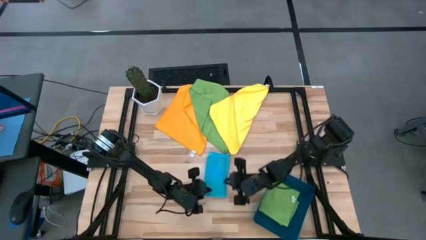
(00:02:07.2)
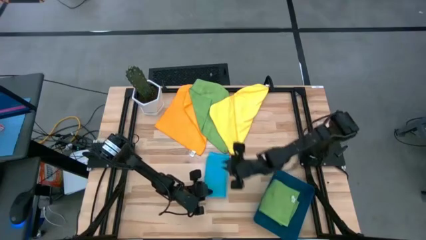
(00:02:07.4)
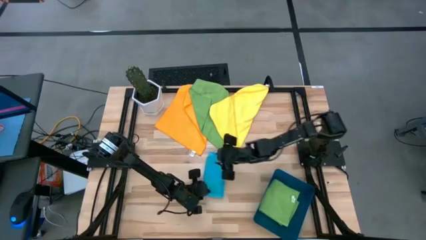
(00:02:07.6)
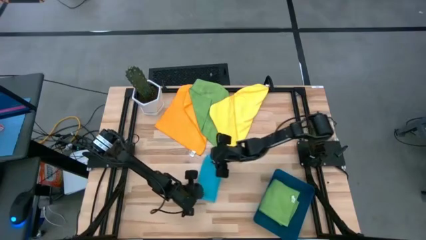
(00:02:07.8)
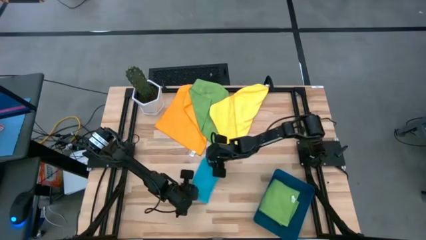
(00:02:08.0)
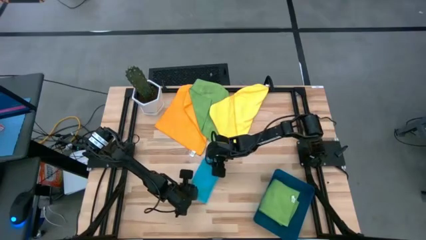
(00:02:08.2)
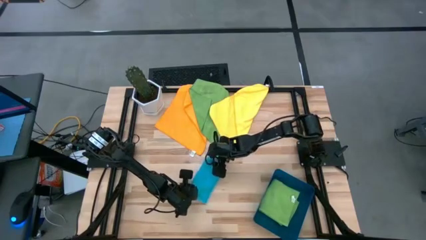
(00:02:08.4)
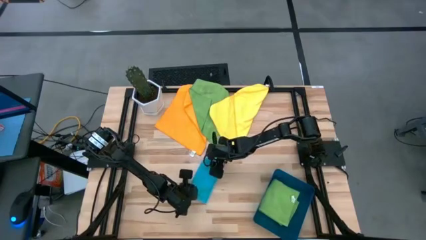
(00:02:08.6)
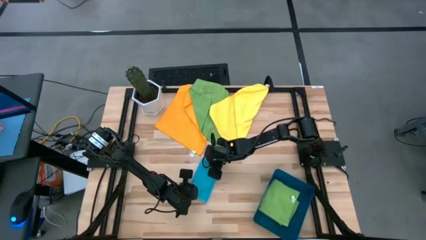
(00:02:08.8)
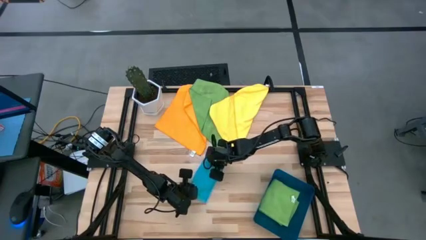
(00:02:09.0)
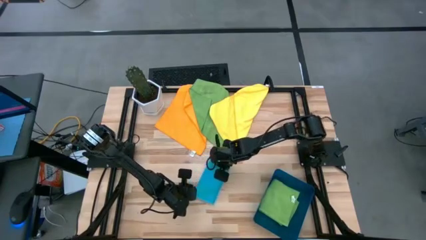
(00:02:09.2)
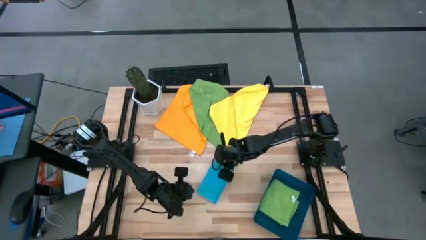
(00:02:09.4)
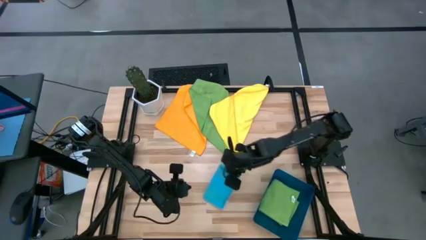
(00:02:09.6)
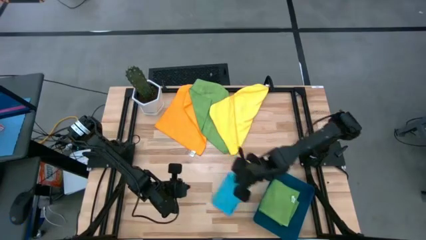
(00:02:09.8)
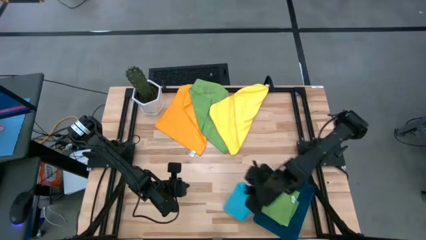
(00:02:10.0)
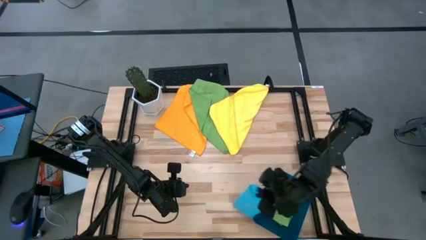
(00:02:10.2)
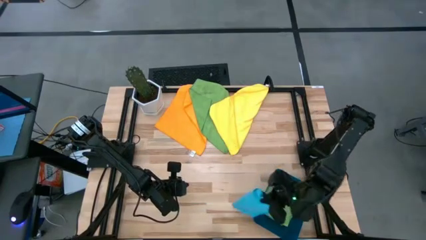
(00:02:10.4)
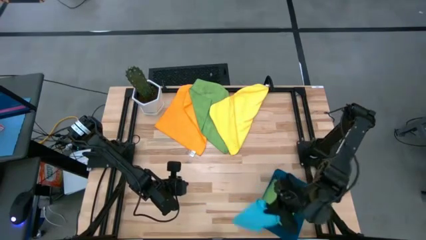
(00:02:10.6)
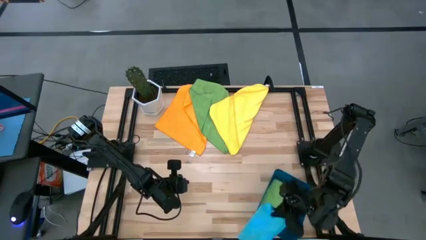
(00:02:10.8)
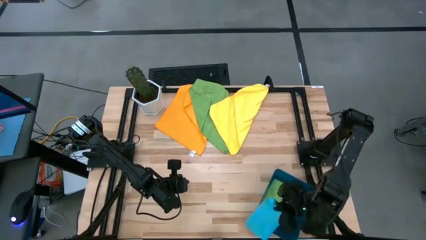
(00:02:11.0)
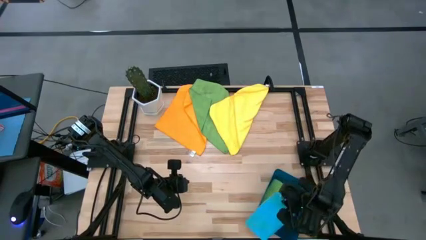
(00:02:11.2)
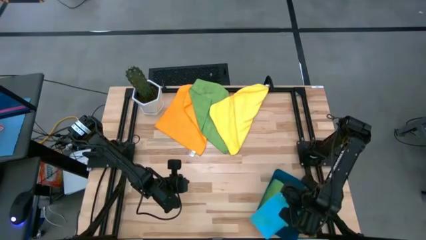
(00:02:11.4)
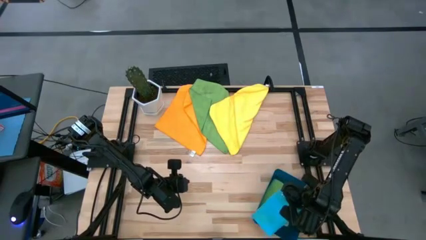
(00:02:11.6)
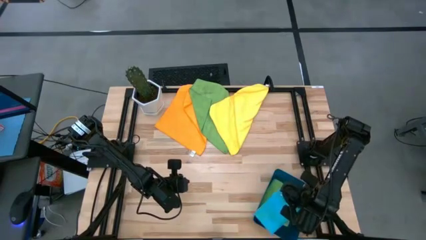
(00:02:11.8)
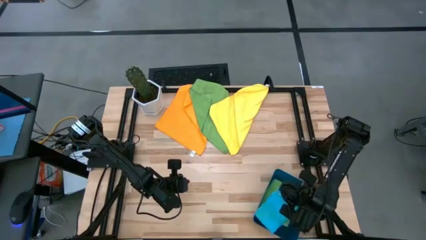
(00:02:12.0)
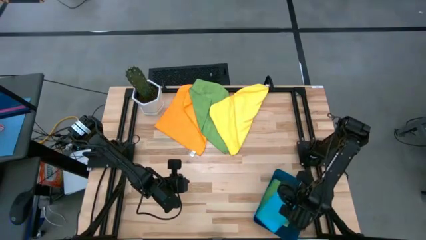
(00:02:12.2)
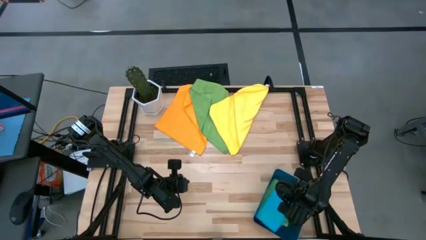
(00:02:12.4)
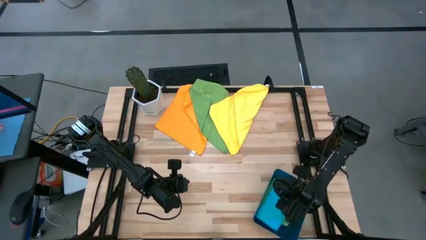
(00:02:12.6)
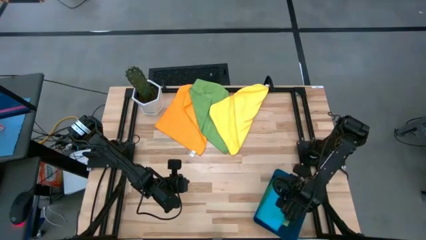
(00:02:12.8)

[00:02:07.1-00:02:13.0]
Task: Fold microfiber towels
Put the folded blue microfiber towel into the blue bin

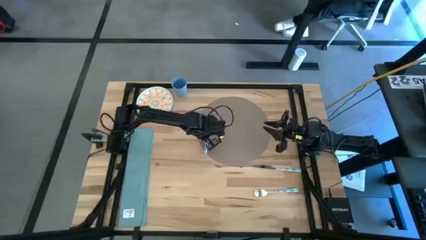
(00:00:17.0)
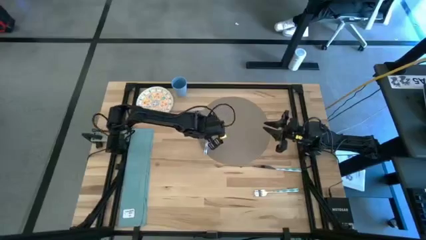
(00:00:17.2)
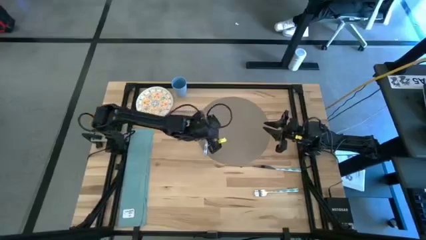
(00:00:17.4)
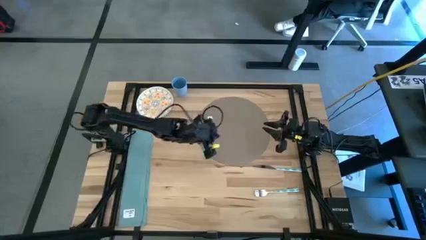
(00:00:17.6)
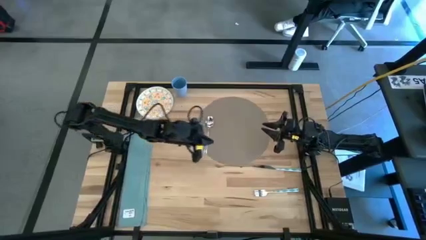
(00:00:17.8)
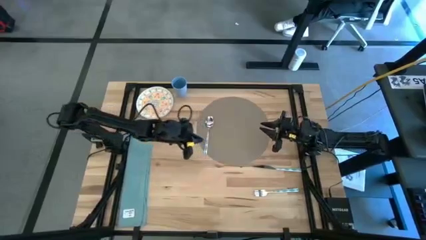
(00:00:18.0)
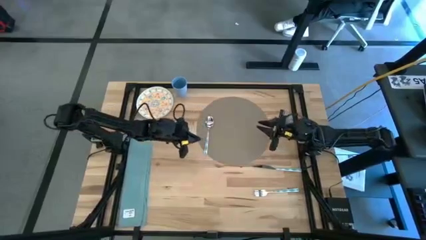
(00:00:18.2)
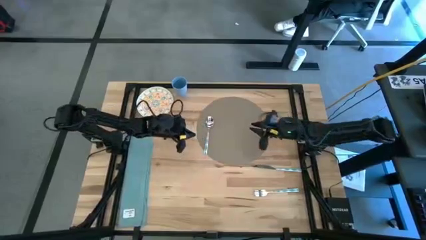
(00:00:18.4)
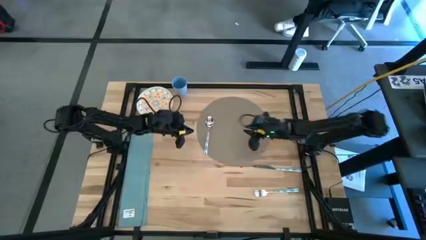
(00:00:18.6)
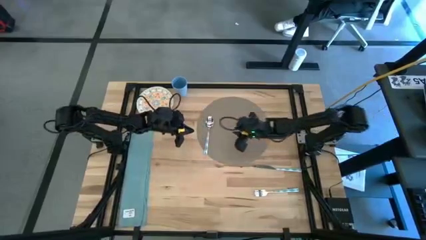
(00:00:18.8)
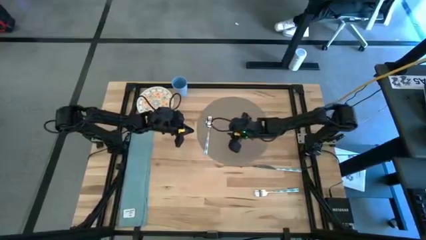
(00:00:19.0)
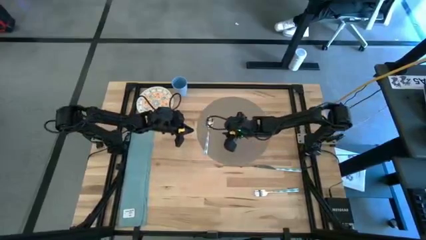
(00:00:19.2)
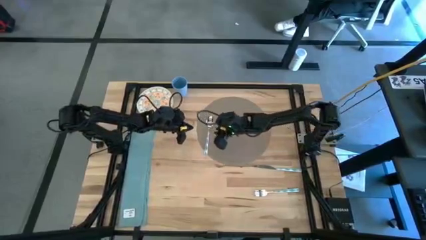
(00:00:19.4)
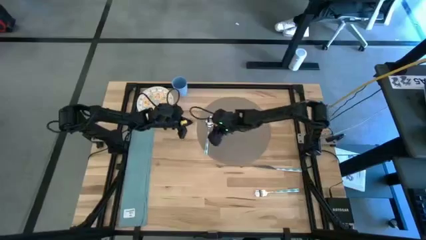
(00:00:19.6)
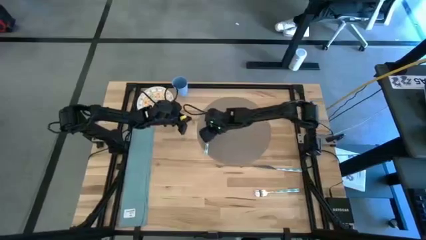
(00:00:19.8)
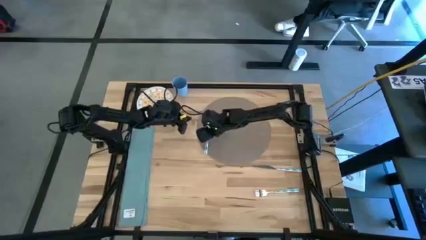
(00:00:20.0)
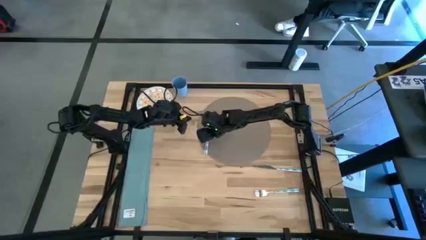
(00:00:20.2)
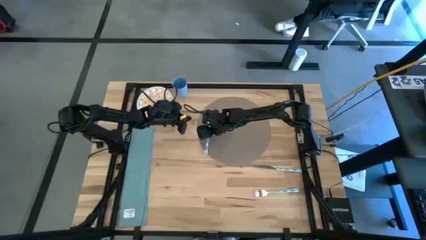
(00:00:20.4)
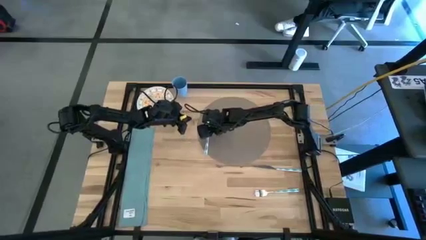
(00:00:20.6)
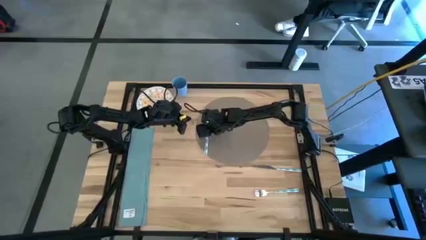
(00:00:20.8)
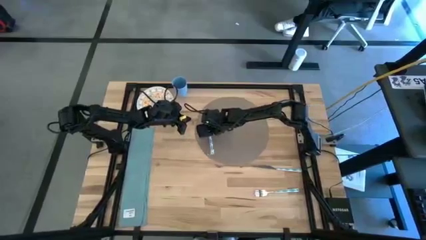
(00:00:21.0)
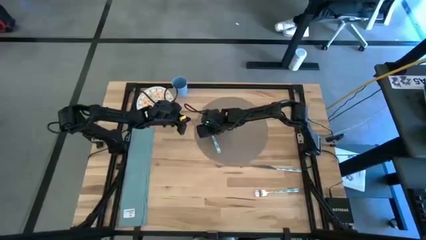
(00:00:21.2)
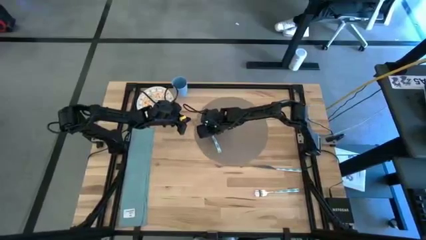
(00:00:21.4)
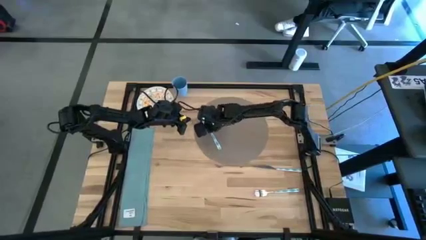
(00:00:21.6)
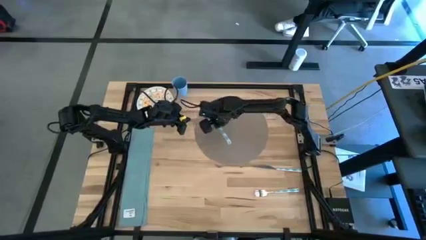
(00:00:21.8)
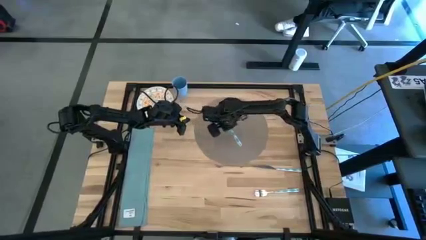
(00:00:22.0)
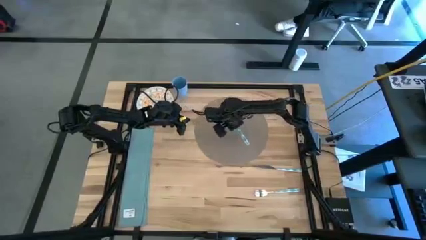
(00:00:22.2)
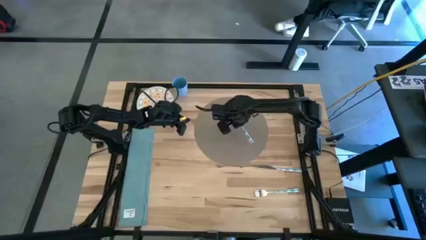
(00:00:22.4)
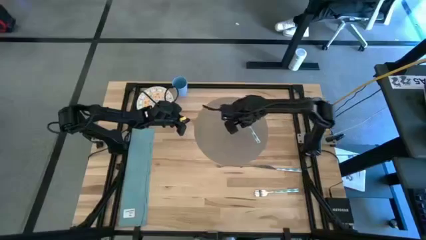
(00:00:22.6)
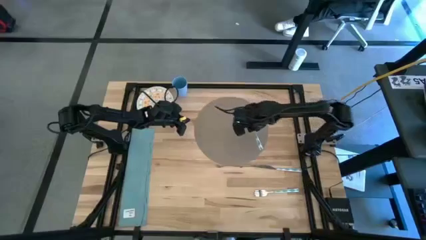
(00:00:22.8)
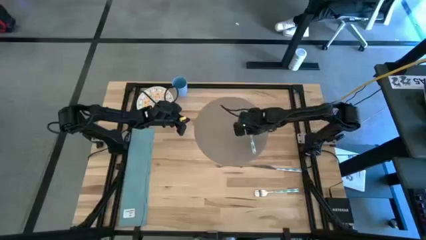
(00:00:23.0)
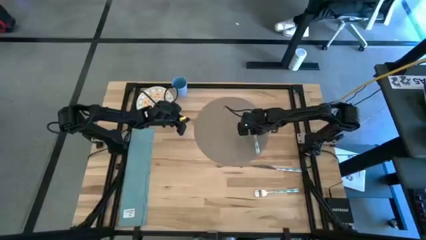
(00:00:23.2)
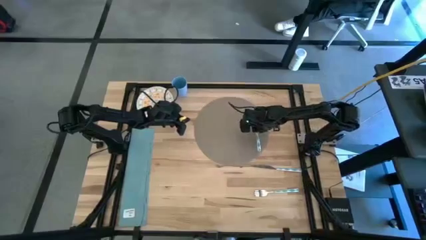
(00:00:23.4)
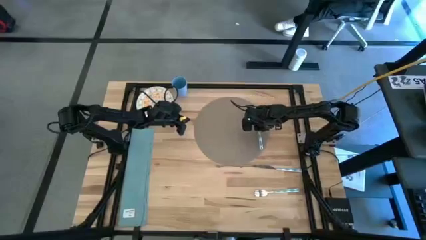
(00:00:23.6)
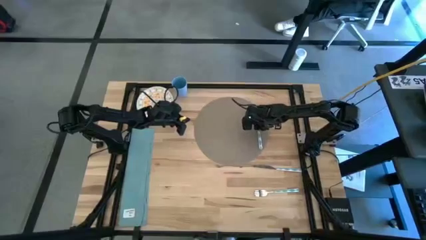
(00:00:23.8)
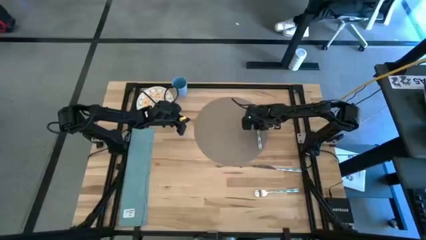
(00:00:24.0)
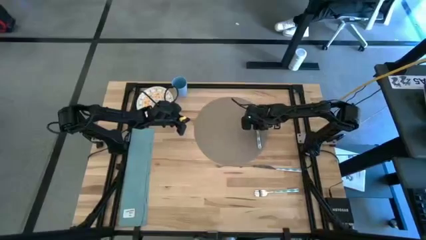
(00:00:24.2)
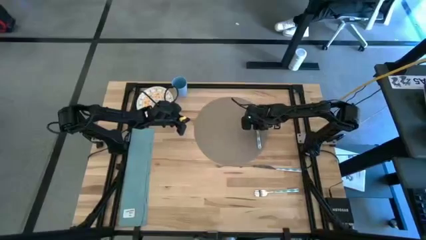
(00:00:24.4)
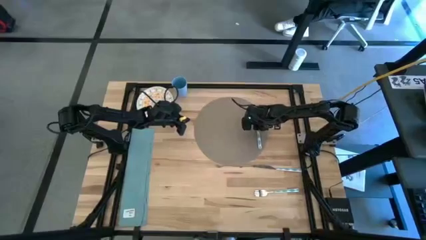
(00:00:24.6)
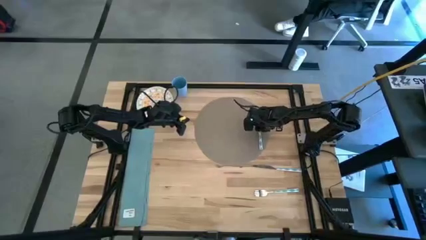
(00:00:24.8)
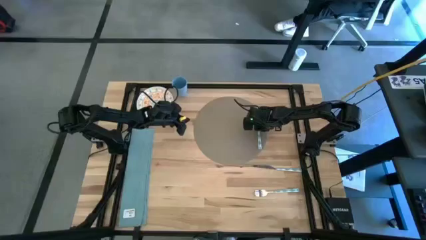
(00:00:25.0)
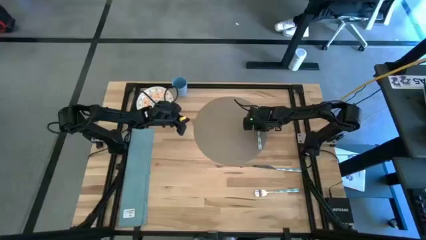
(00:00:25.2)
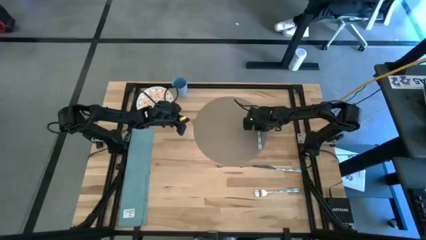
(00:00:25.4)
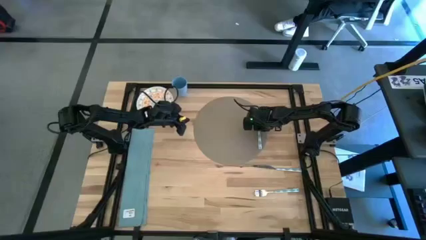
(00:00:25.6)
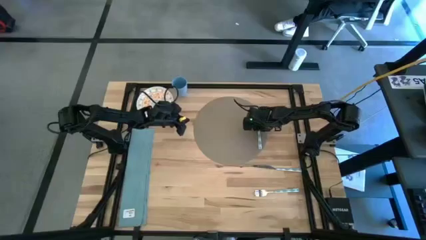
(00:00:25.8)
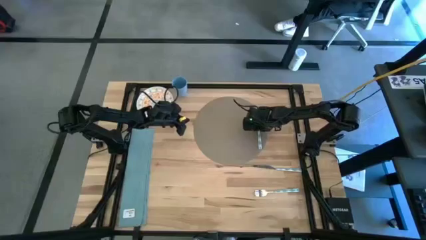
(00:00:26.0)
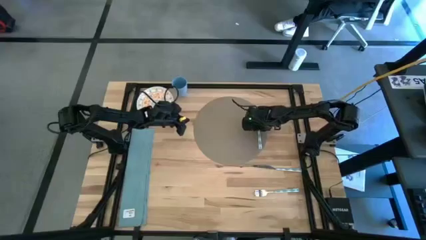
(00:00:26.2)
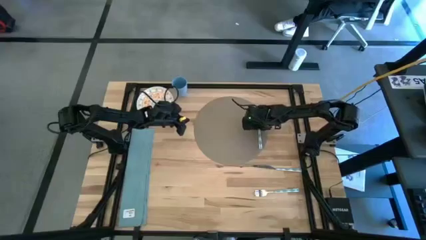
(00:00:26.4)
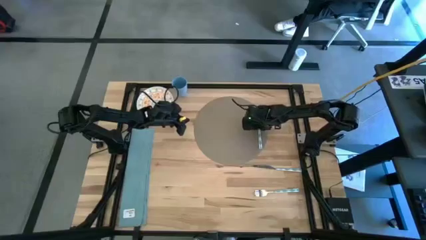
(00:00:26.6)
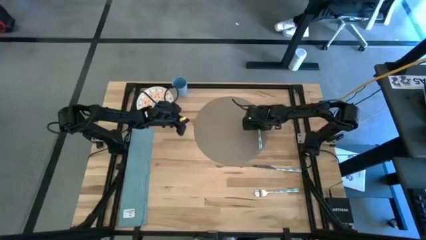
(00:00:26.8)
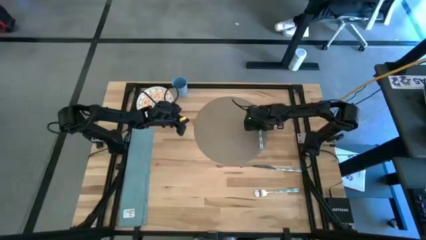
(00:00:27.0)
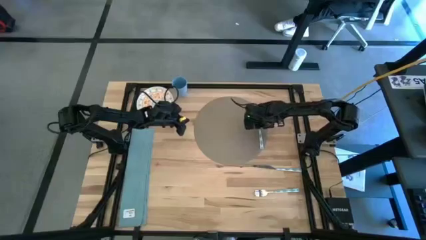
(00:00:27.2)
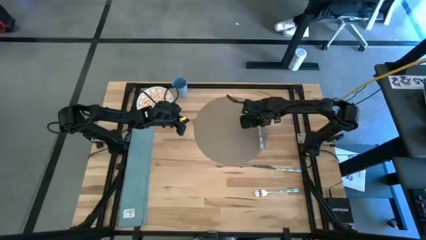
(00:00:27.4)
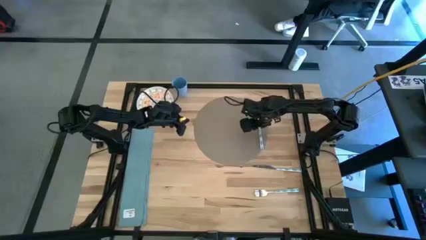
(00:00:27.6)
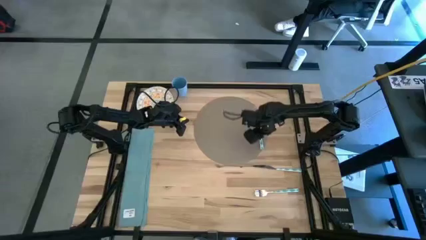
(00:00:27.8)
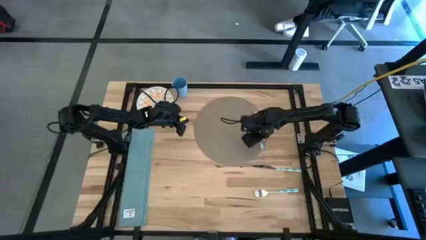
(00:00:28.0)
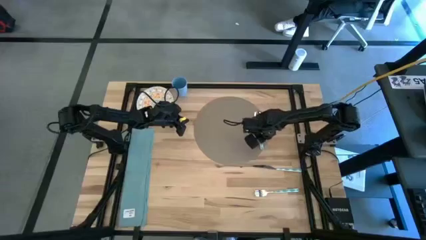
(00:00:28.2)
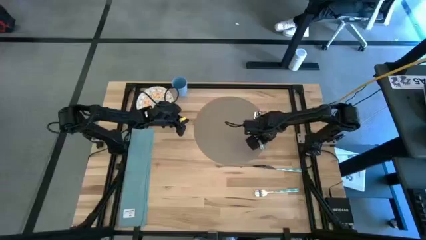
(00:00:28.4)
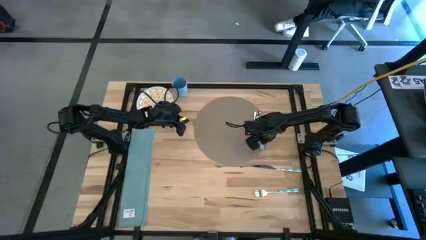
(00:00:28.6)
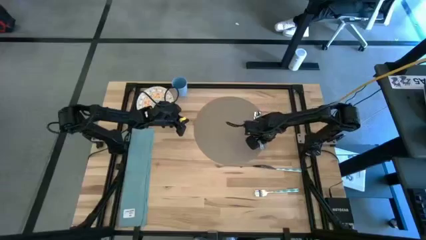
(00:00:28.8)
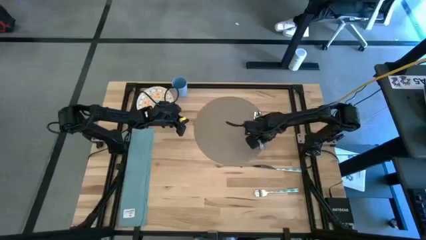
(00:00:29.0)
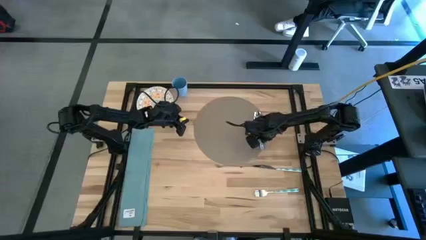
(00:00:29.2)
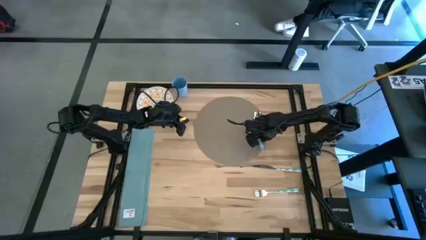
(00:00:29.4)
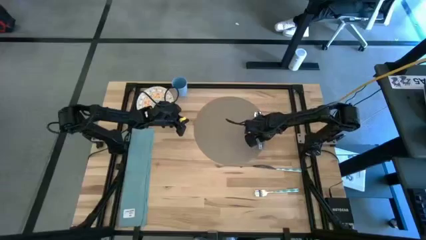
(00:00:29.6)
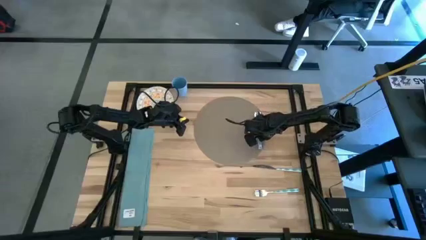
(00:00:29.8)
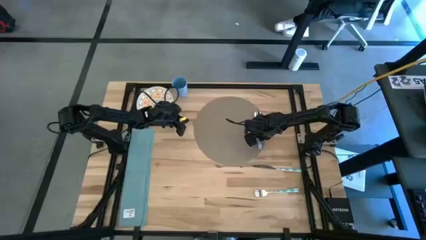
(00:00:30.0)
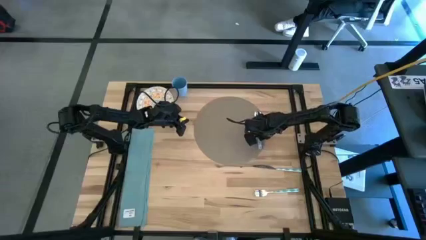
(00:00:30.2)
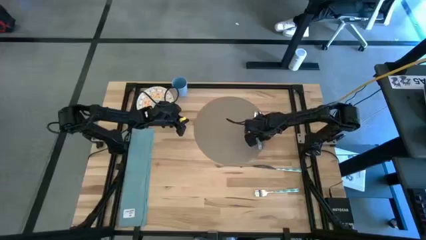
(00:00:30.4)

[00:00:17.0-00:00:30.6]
Task: Set table place
Put the blue spoon on the brown mat
